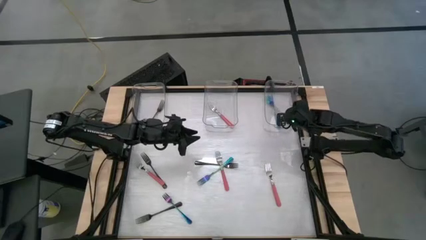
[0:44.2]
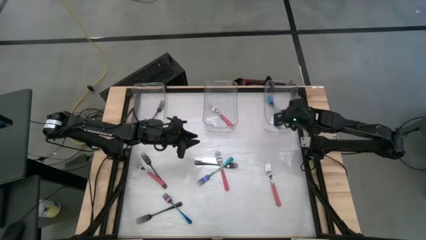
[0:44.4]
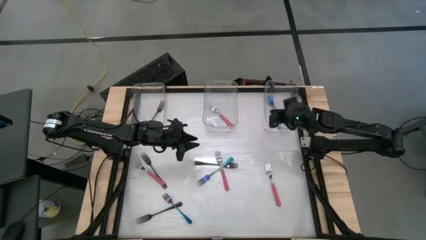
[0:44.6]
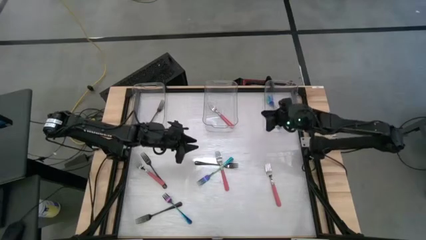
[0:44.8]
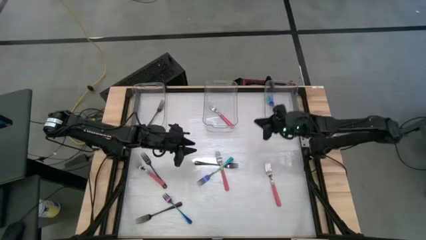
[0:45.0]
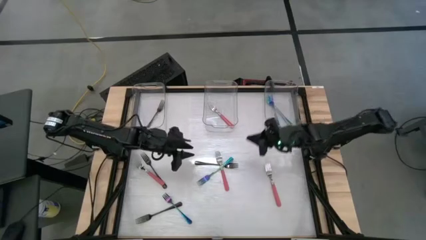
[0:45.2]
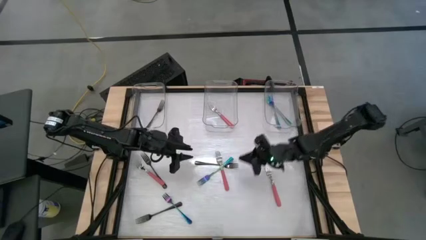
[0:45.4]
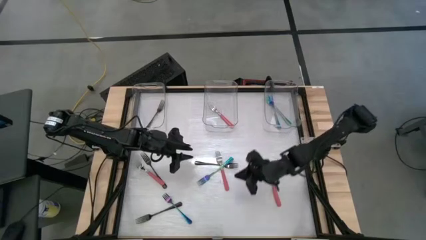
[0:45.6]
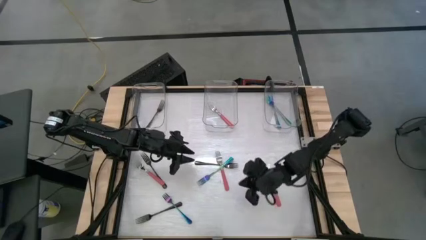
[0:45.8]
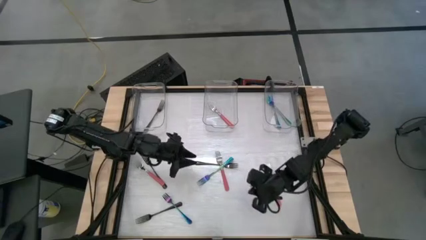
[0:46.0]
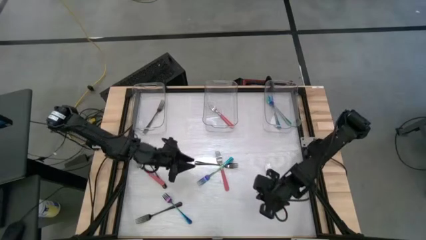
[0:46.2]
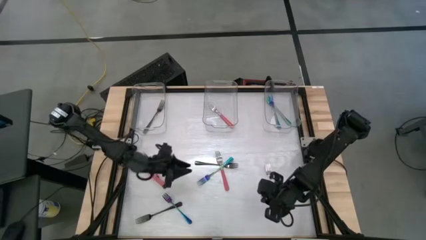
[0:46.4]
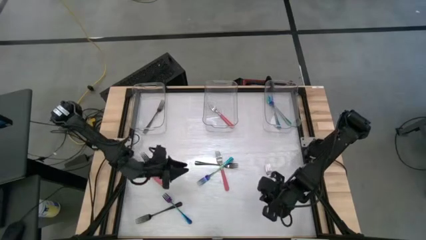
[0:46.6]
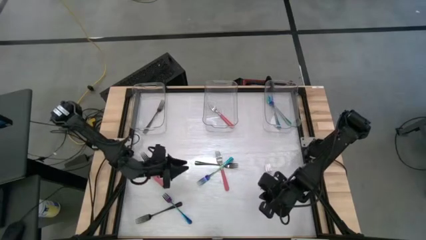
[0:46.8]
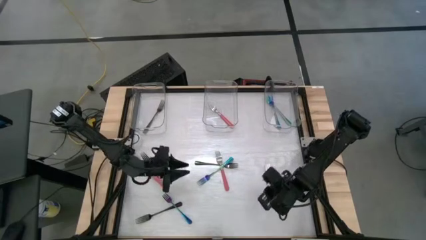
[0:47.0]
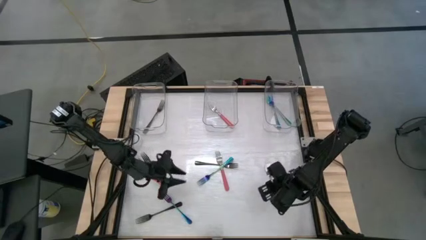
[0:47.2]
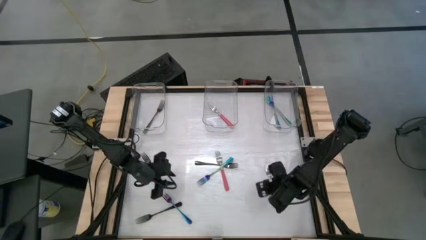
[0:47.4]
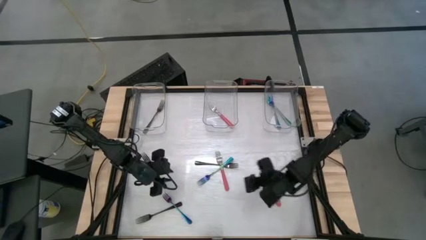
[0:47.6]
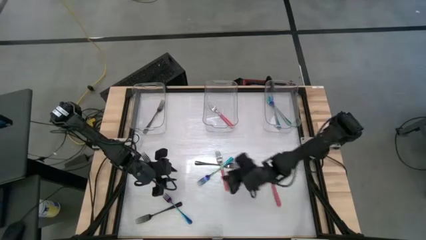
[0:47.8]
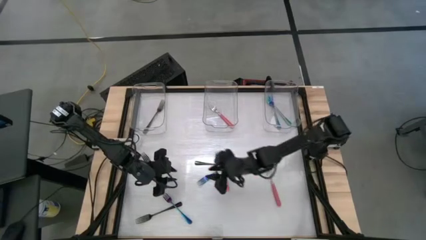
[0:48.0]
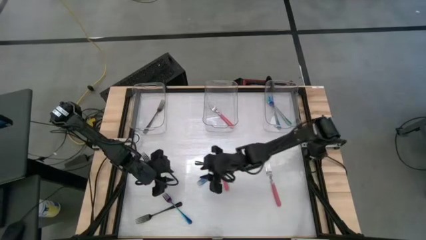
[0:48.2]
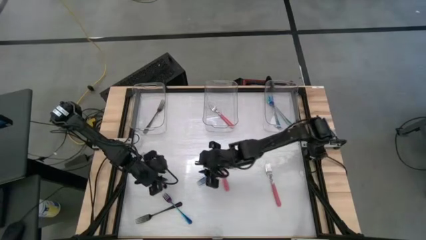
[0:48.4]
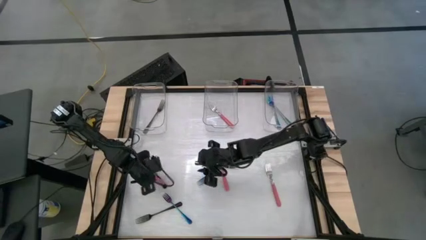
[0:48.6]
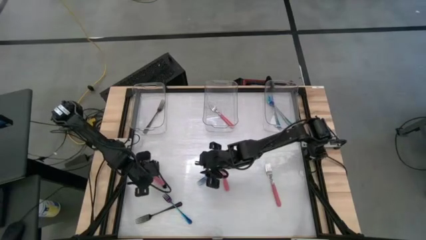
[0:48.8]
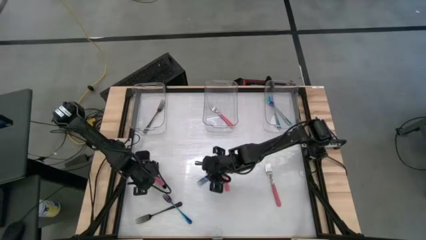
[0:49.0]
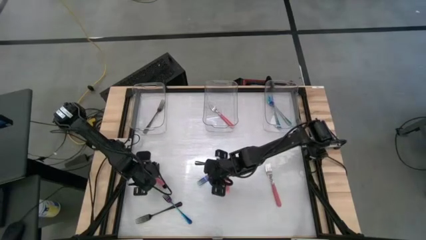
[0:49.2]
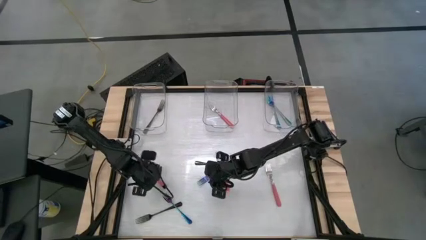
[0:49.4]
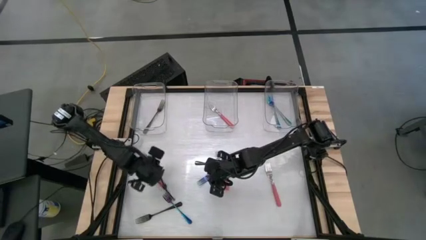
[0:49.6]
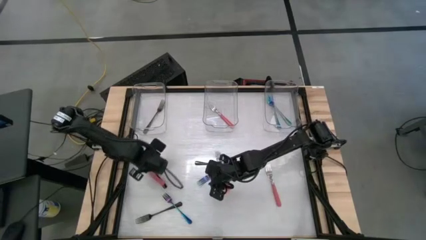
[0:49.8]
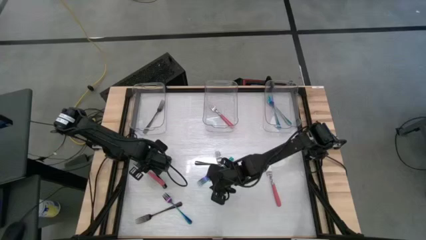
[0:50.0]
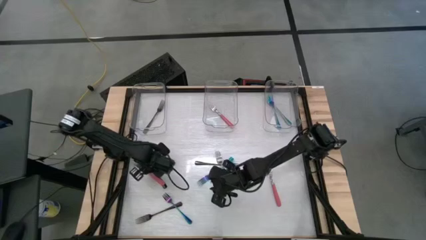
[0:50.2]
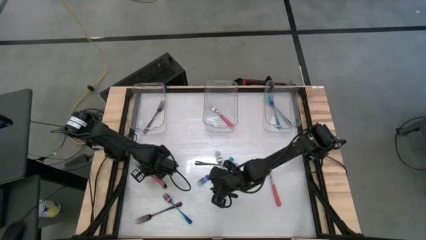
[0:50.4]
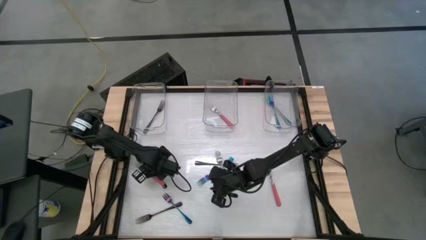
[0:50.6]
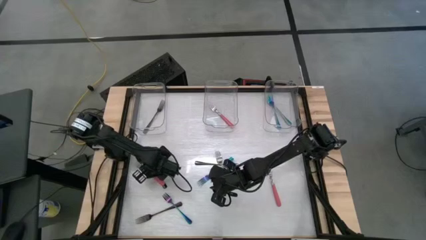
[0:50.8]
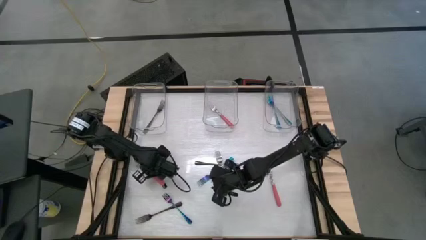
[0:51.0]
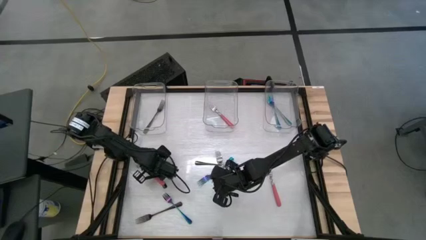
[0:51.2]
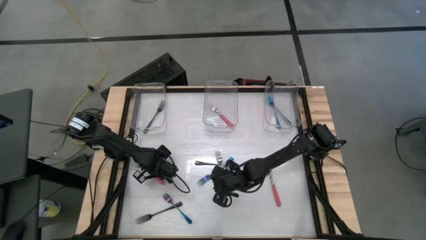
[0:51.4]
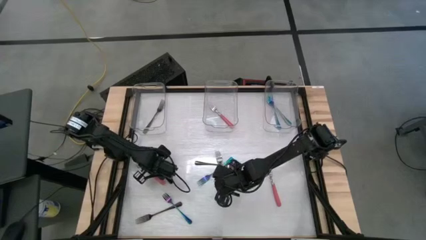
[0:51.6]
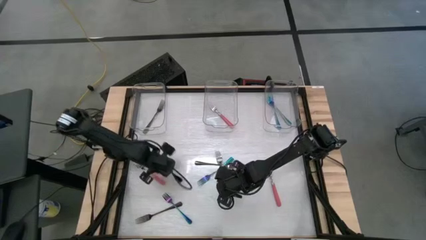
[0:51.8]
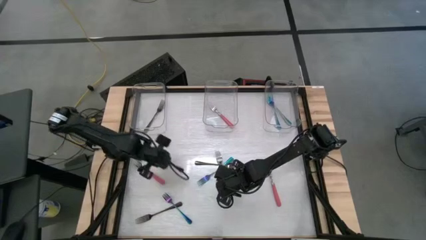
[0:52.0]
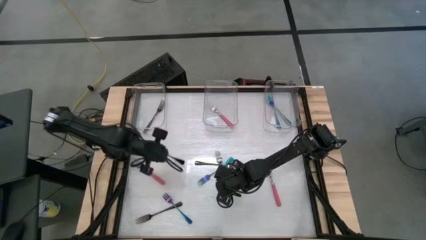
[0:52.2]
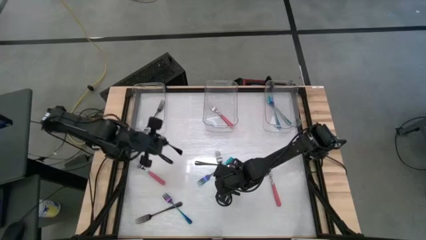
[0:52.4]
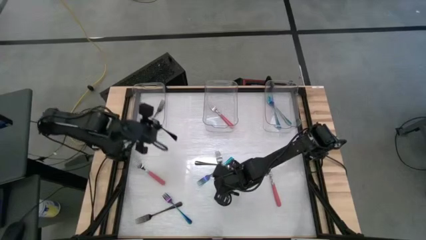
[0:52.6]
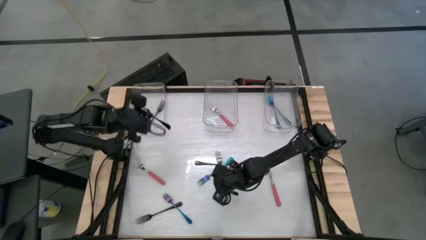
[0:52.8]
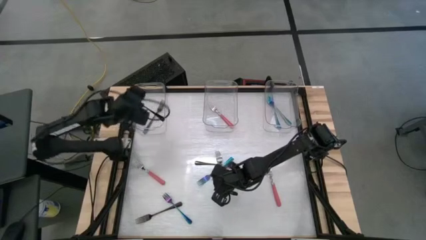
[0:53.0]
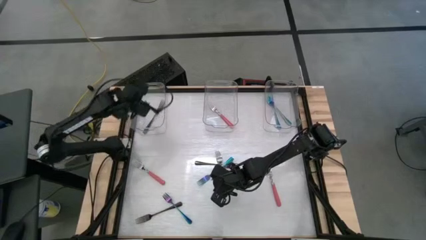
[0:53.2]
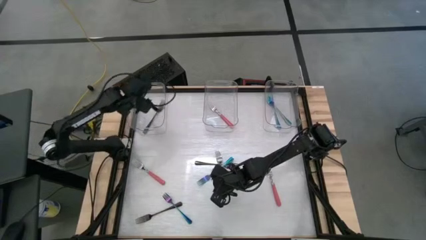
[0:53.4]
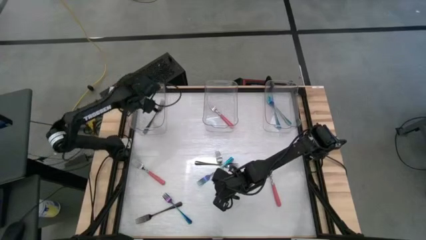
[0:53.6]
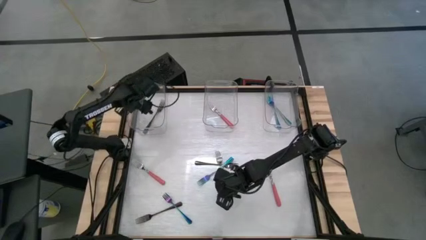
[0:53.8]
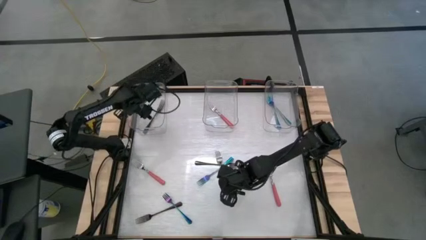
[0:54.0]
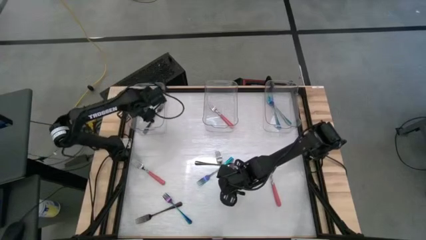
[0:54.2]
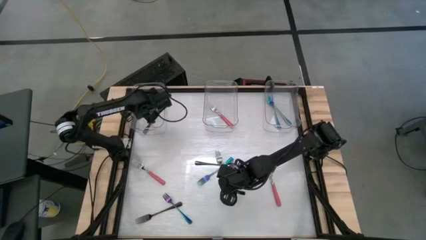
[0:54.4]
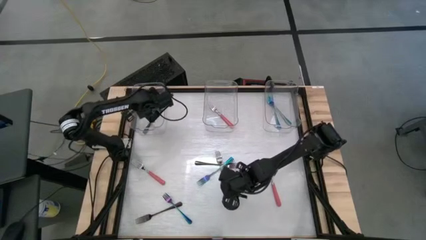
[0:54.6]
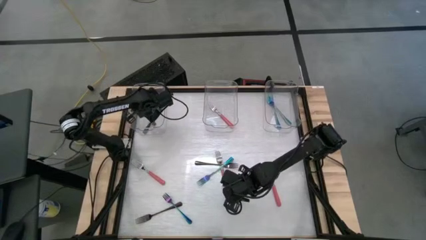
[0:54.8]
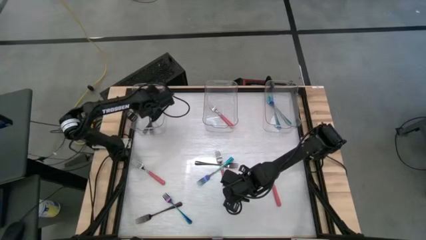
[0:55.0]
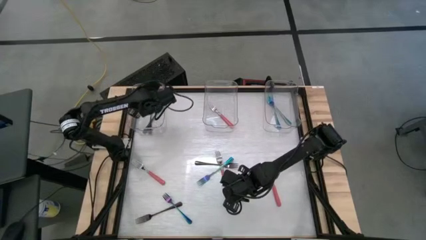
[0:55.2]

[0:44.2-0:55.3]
Task: Sort silverware by color (type)
Put the top left black fork into the left transparent bin

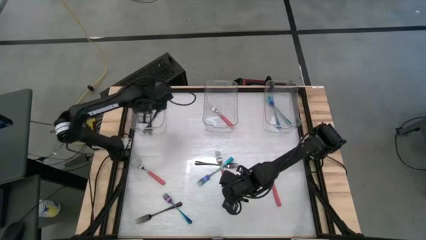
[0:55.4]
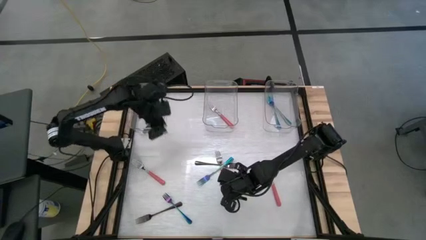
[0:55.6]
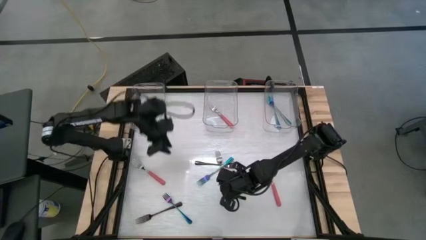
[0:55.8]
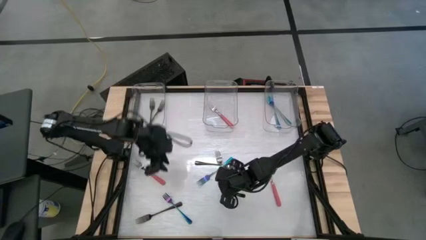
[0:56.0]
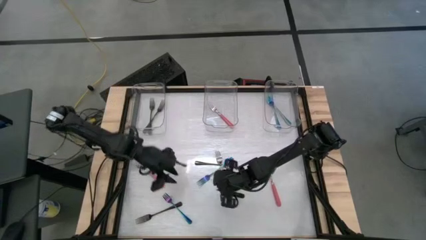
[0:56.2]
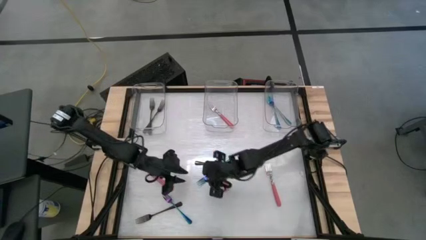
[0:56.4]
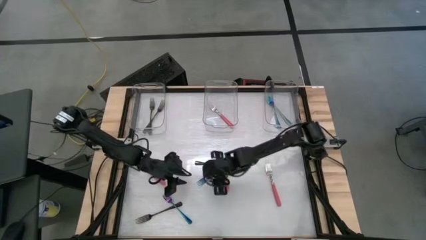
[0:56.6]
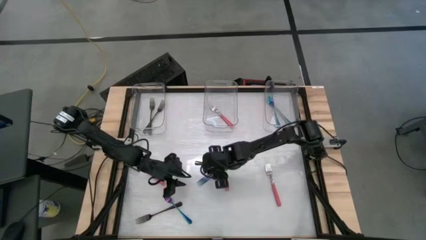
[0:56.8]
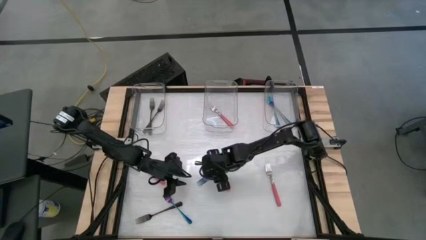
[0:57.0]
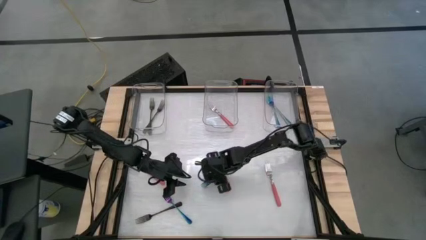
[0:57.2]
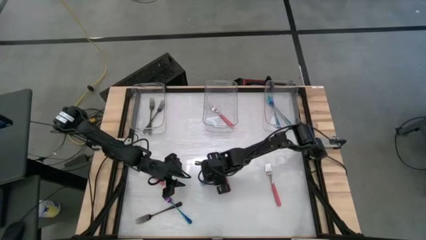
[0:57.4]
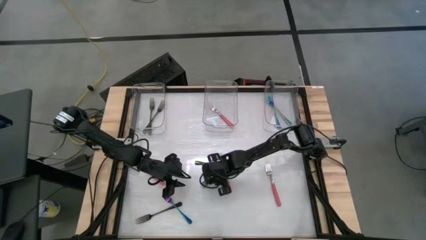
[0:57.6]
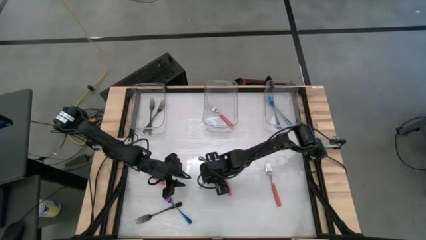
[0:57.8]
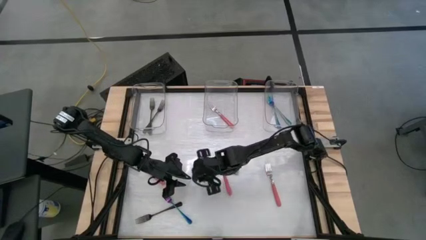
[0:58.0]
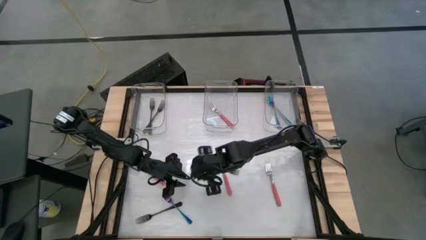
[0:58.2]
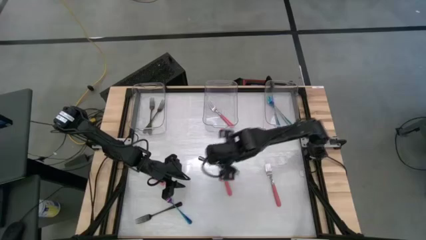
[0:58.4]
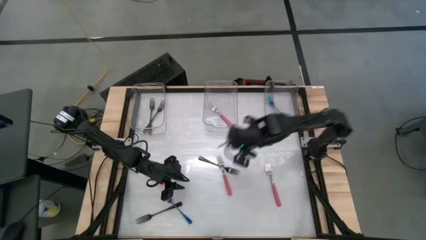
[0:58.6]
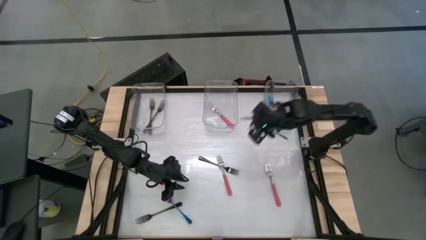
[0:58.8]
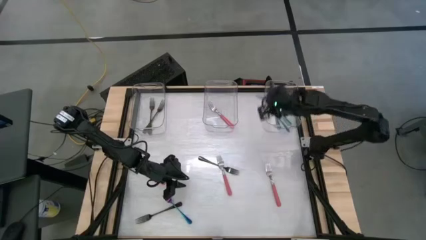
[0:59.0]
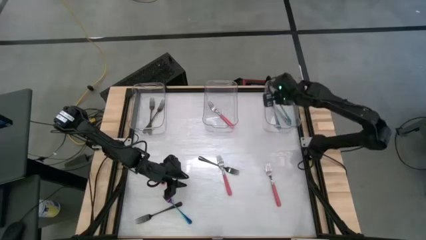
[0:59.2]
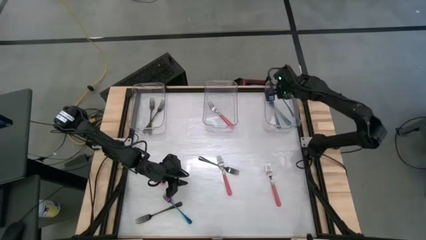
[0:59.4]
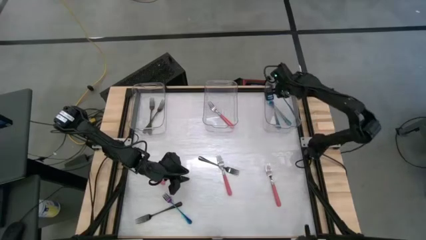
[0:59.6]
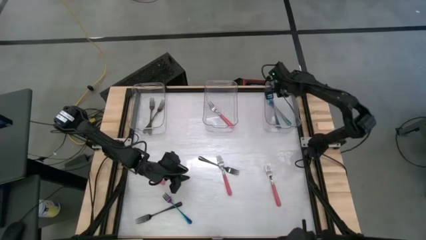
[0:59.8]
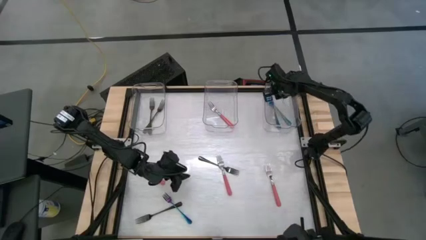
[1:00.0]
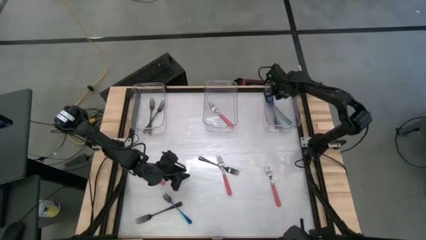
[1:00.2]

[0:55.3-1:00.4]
Put the top iridescent fork into the right transparent bin
